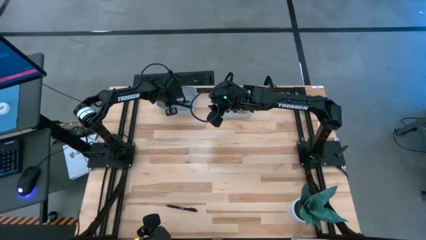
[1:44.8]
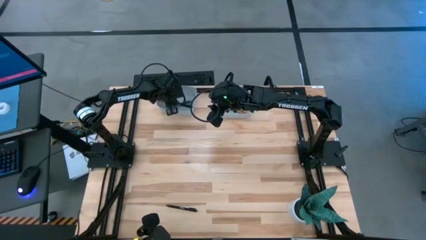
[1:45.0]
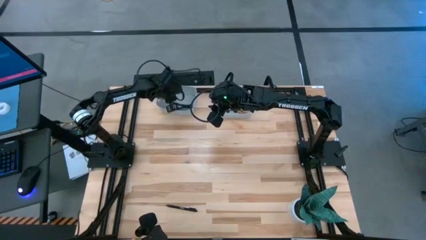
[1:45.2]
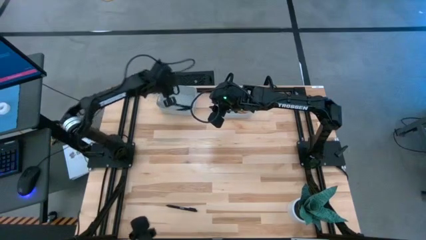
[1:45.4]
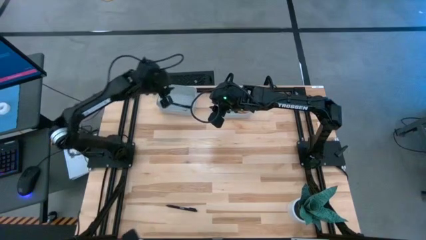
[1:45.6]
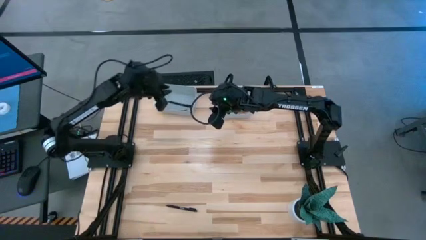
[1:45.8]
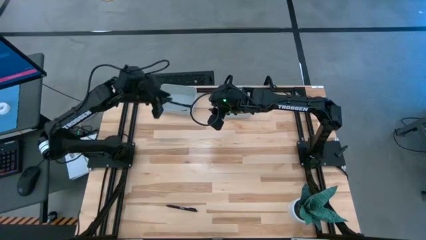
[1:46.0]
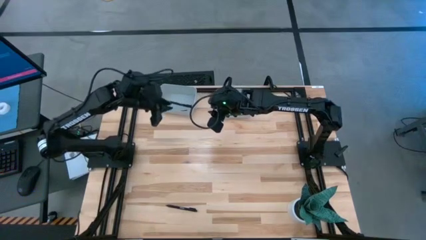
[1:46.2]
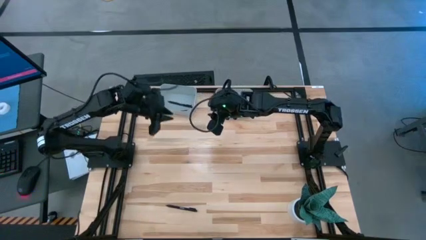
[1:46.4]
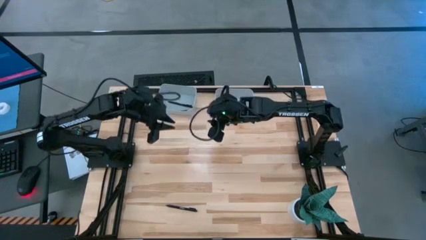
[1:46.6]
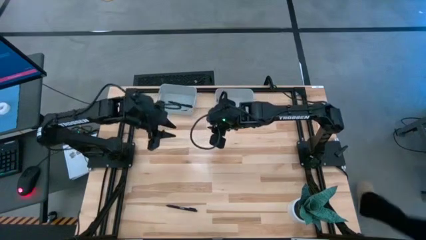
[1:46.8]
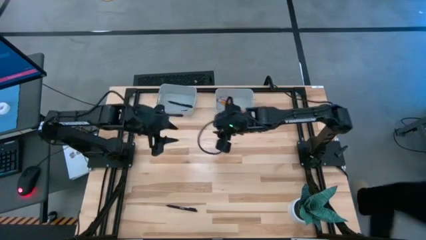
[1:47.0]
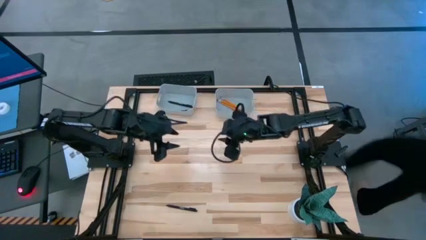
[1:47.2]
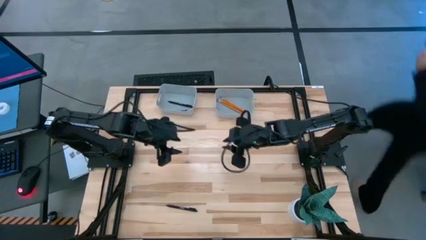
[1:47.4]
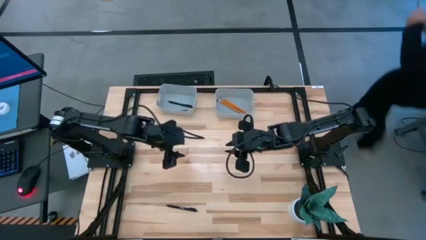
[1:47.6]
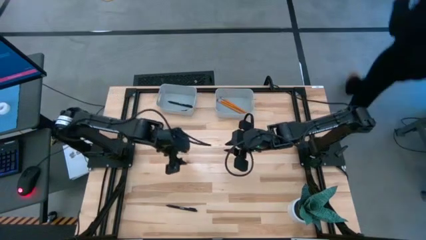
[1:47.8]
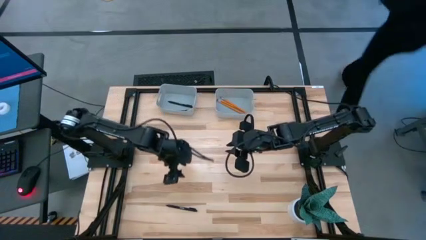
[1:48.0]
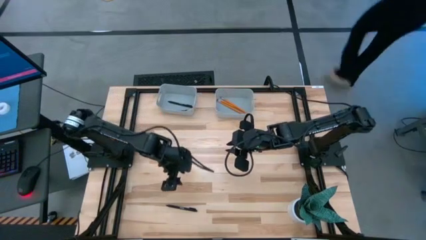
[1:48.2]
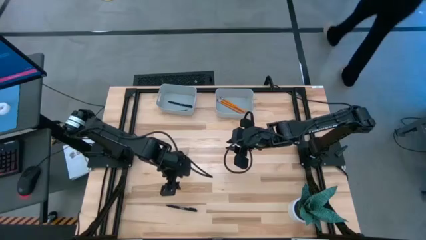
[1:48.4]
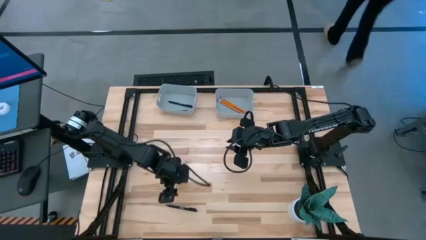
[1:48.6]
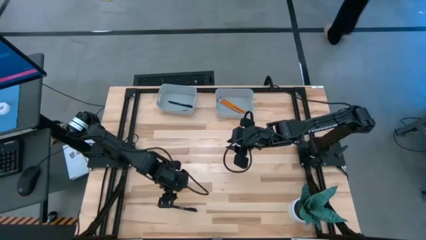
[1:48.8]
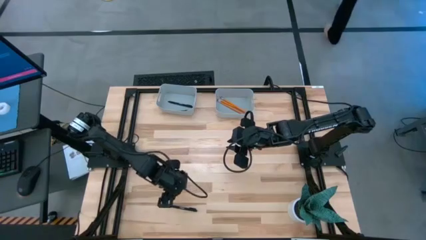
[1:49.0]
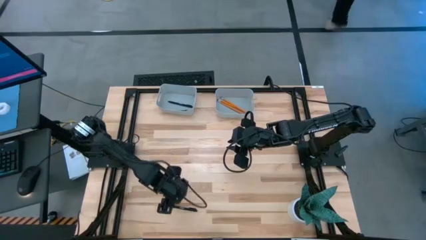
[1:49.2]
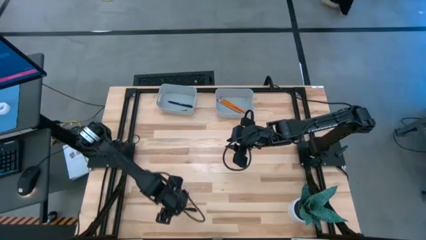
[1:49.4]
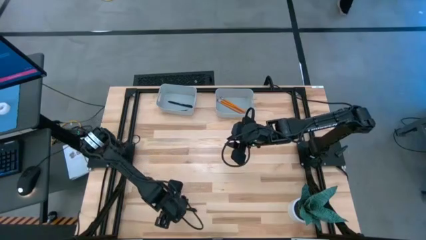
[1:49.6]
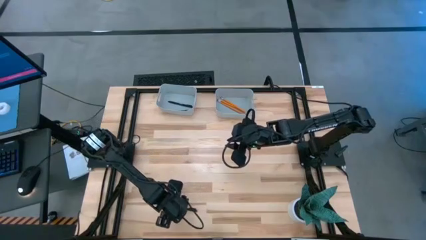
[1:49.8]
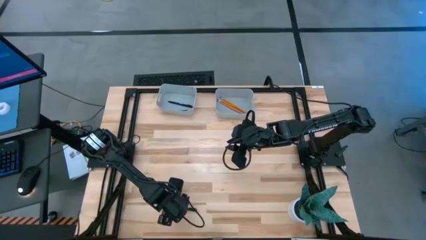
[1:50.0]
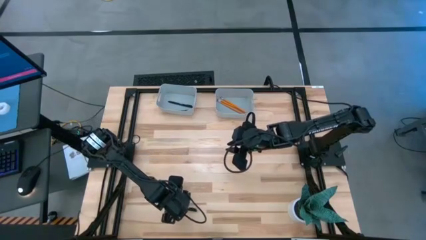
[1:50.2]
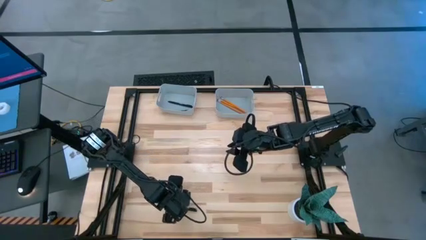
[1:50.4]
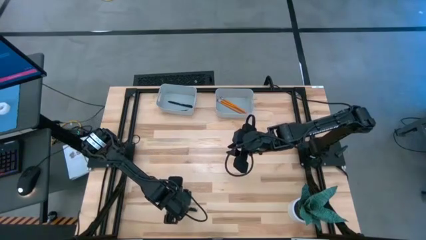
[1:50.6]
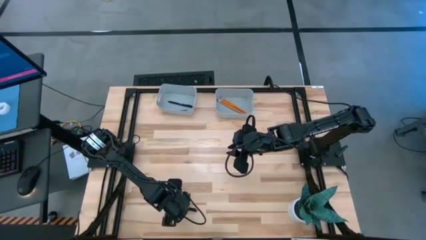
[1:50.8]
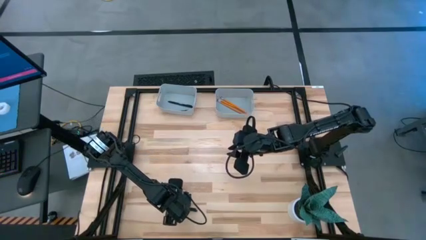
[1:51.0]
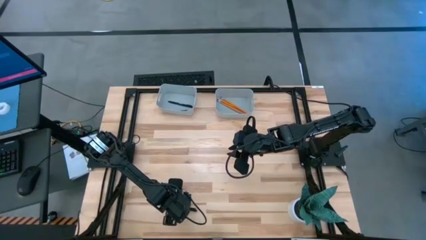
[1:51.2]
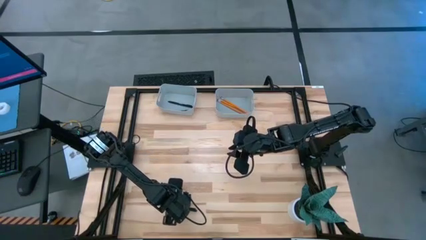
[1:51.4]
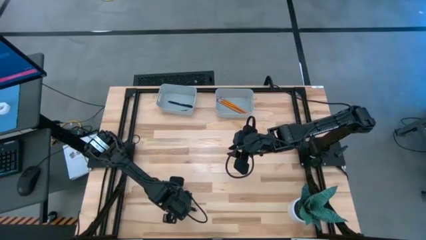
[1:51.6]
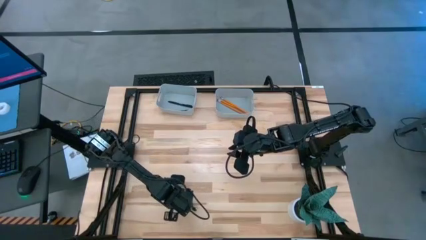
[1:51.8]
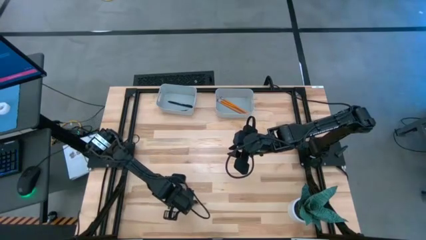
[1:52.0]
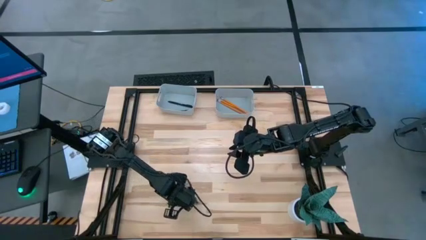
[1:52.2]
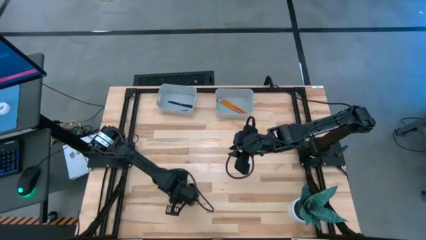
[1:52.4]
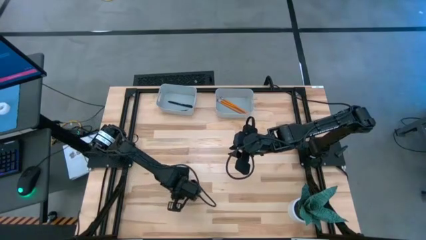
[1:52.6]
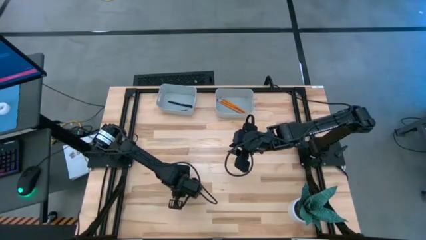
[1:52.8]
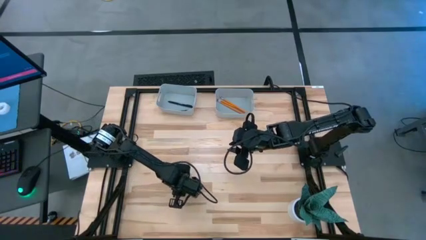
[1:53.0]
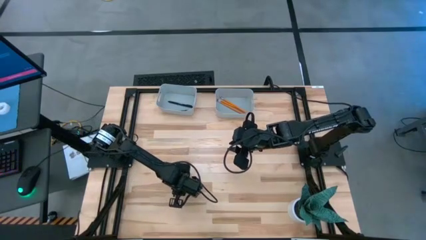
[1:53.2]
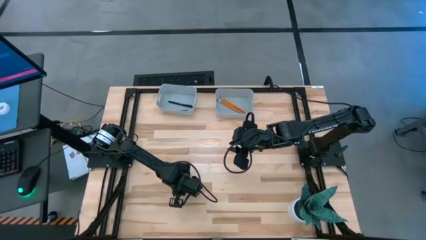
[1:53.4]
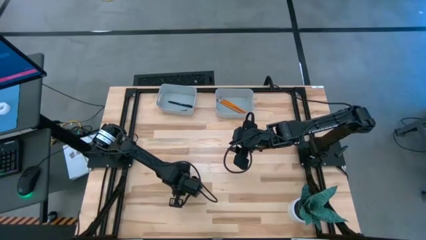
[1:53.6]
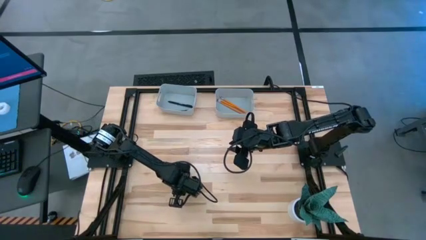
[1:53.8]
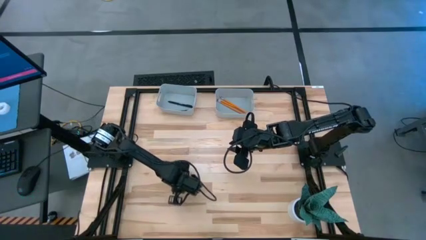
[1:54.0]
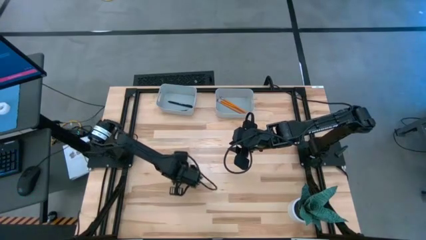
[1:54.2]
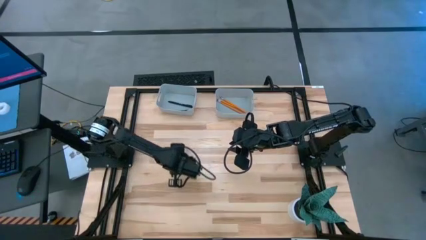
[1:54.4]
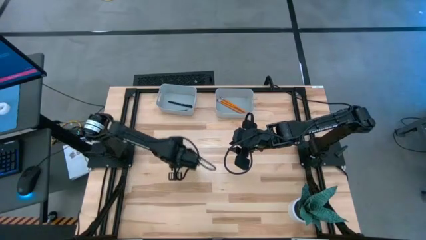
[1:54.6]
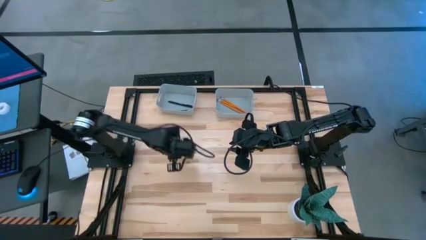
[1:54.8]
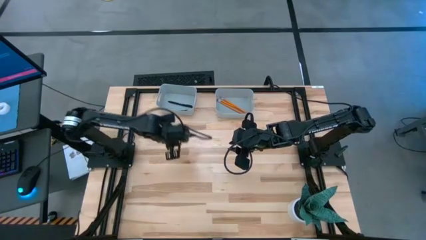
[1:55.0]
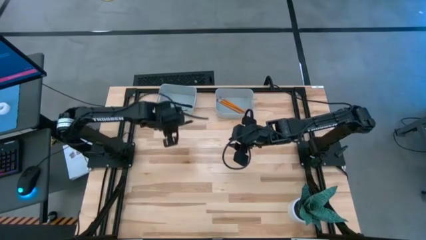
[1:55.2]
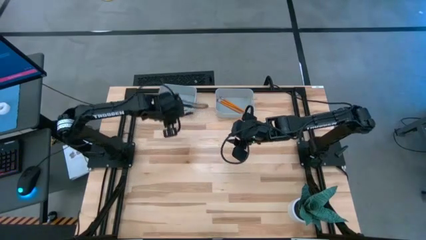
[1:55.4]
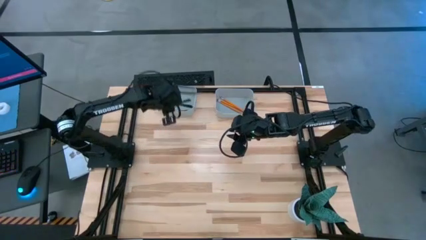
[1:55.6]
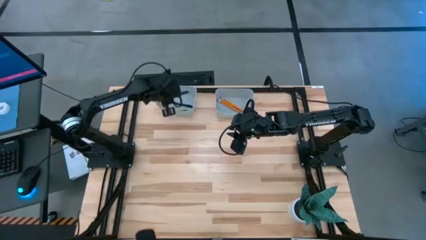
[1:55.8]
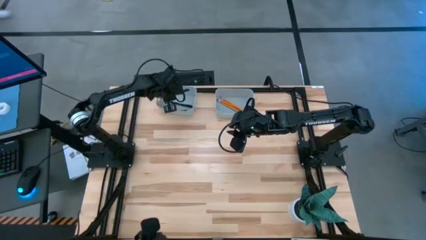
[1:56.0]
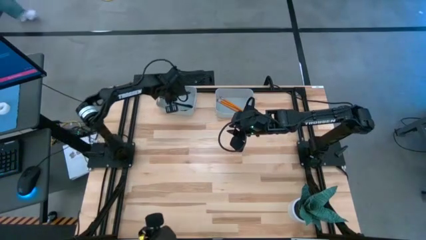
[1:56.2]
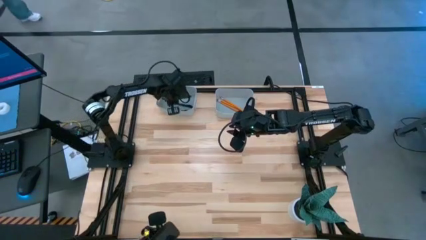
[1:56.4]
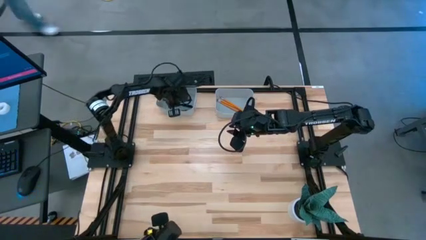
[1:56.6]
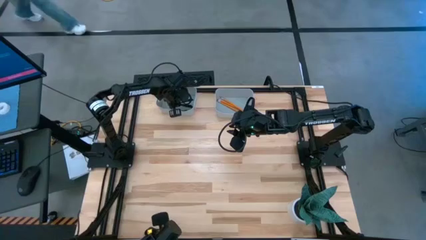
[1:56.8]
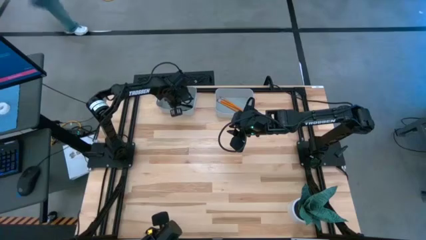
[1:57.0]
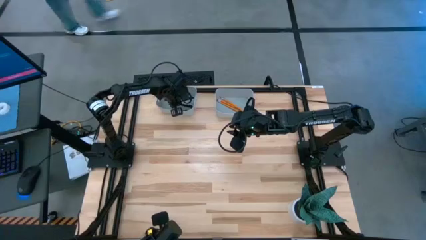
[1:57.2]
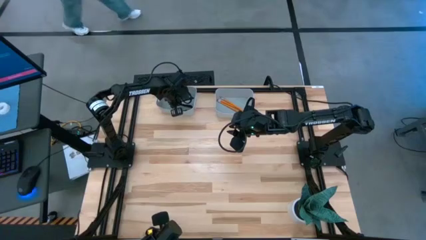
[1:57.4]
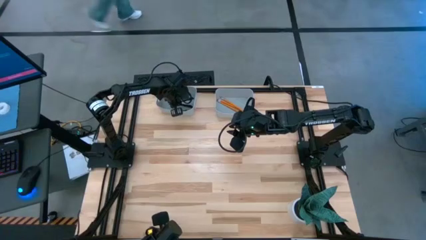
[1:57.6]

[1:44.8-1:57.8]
Task: Sort pens & pencils
Put the black pen into the left gray bin

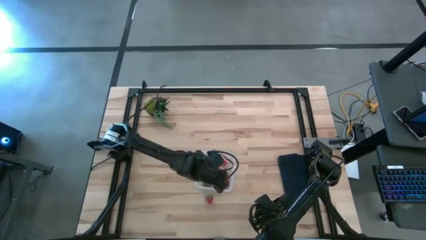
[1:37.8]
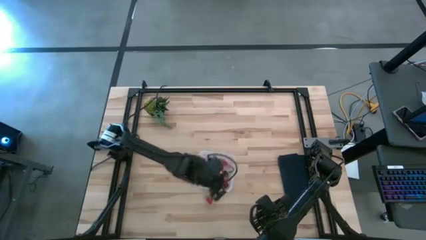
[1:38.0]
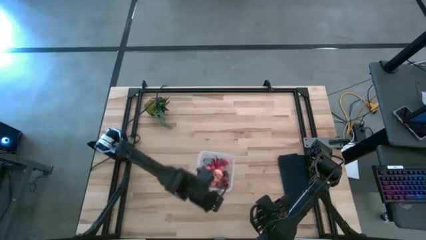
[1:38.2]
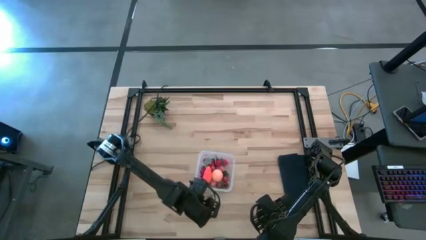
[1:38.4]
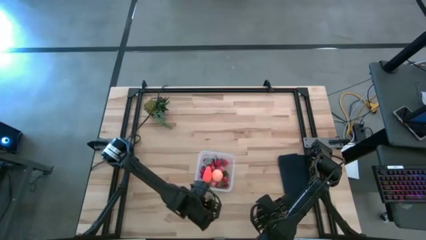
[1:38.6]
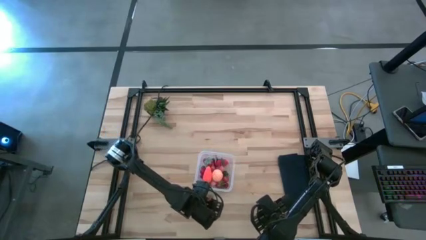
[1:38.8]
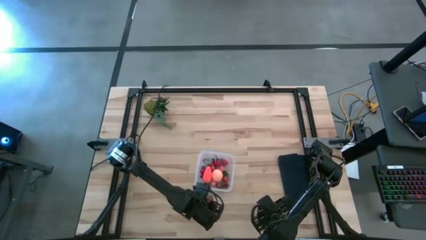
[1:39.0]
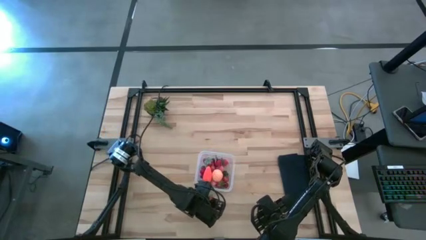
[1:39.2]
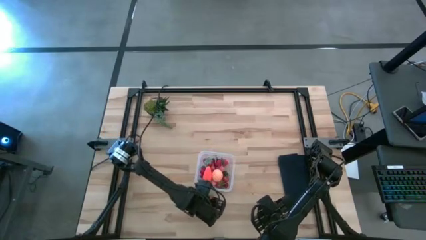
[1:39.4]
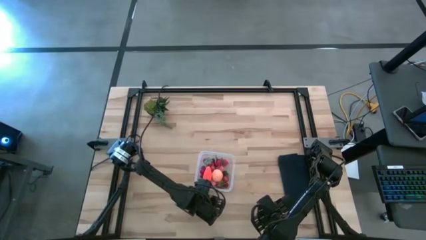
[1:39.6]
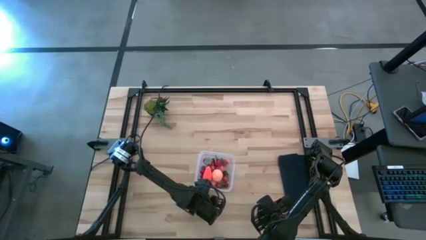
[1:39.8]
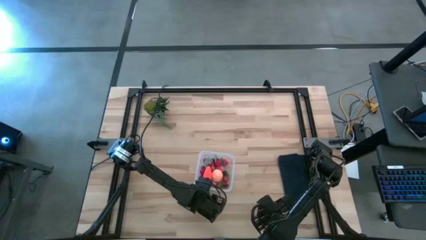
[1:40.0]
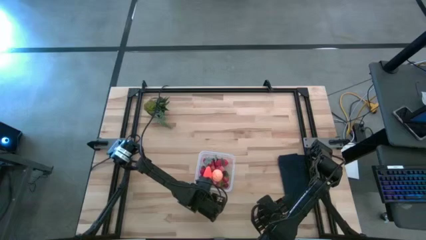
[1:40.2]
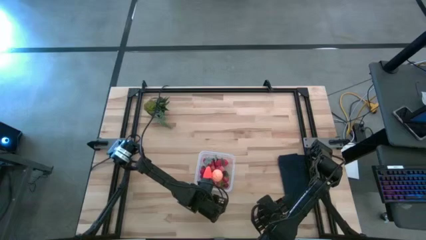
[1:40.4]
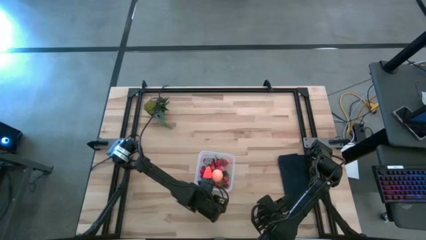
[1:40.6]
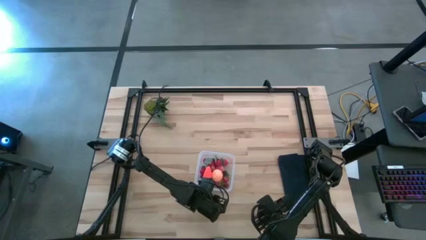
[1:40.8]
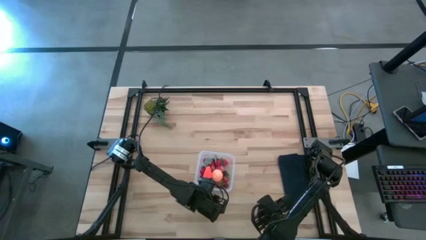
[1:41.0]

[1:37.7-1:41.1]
Task: Pick and placing Produce into tupperware
Put the strawberry into the transparent container
